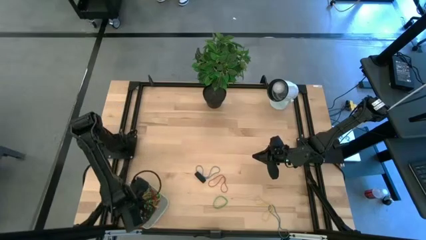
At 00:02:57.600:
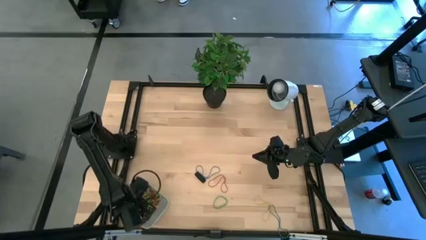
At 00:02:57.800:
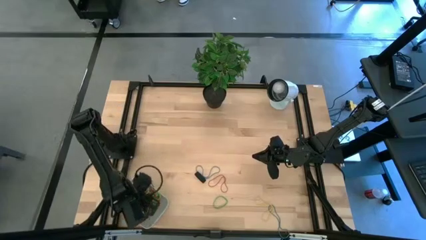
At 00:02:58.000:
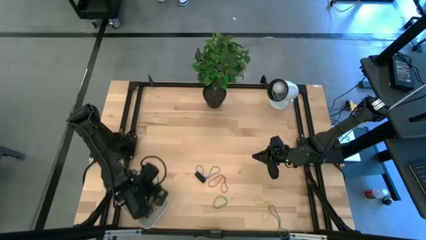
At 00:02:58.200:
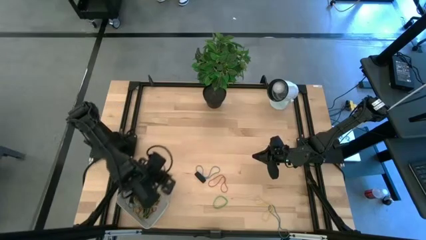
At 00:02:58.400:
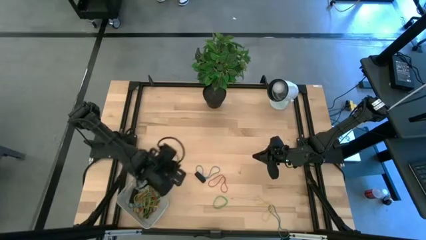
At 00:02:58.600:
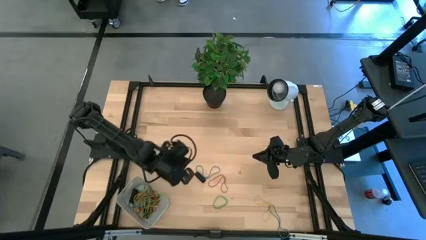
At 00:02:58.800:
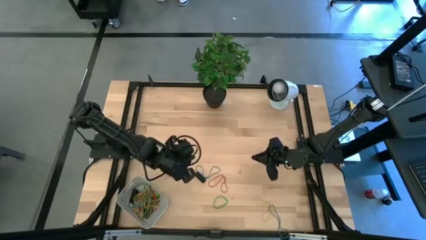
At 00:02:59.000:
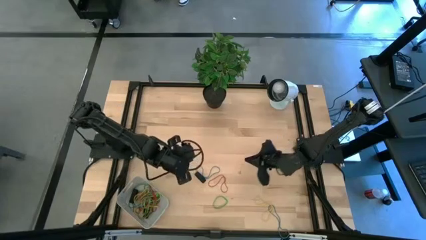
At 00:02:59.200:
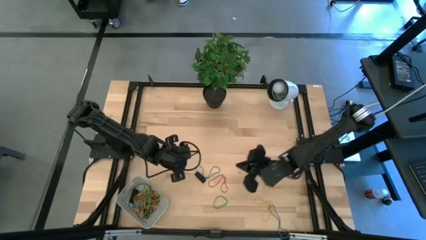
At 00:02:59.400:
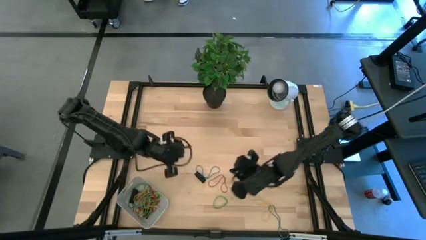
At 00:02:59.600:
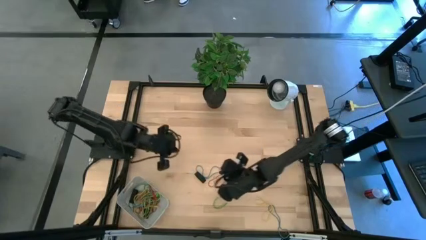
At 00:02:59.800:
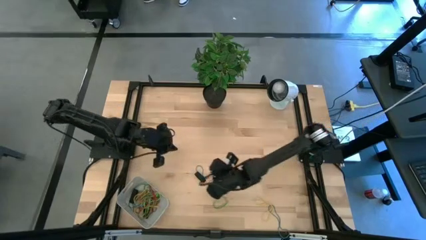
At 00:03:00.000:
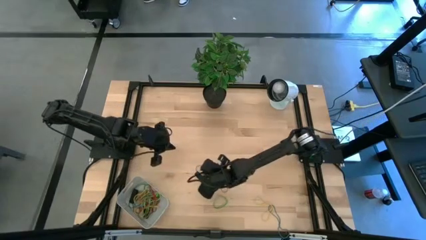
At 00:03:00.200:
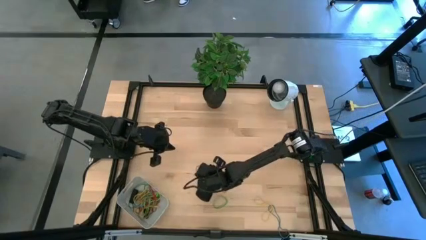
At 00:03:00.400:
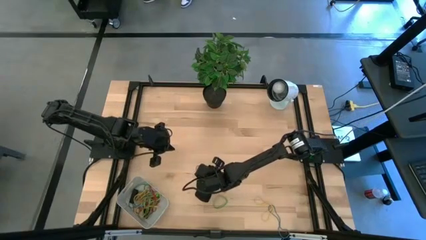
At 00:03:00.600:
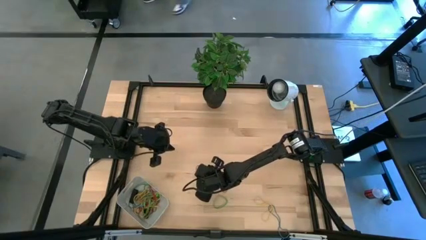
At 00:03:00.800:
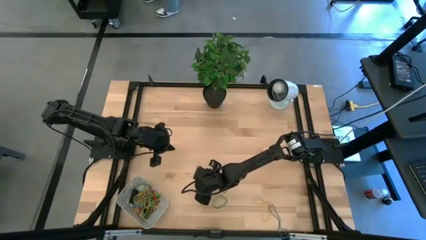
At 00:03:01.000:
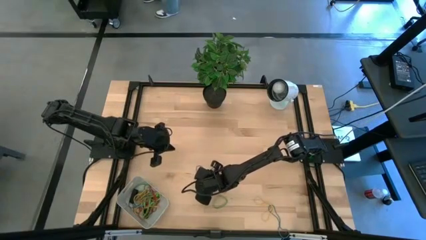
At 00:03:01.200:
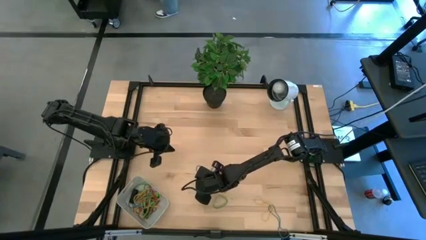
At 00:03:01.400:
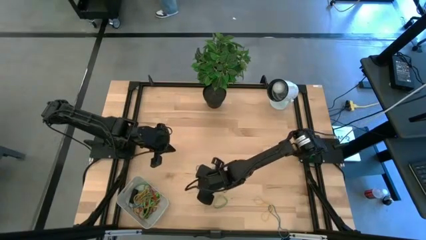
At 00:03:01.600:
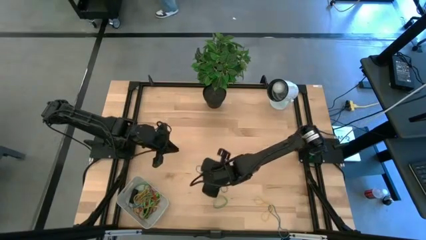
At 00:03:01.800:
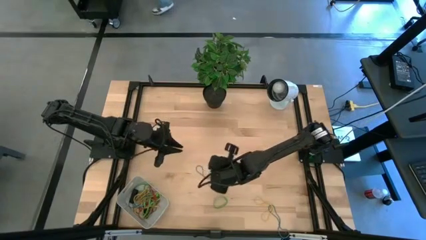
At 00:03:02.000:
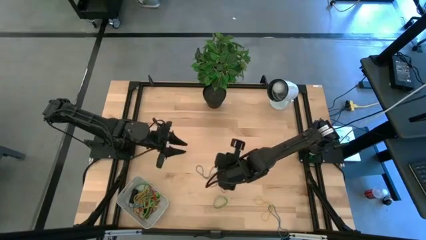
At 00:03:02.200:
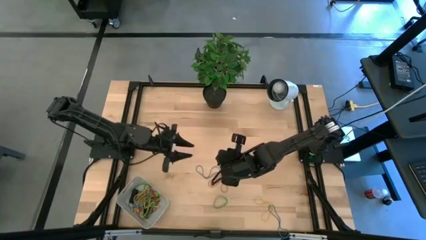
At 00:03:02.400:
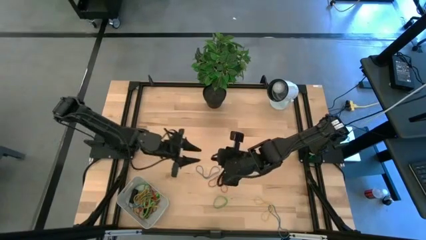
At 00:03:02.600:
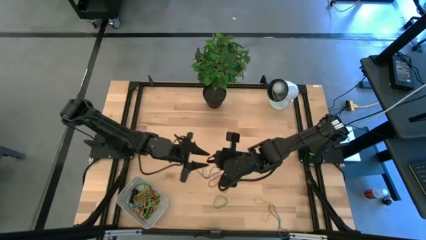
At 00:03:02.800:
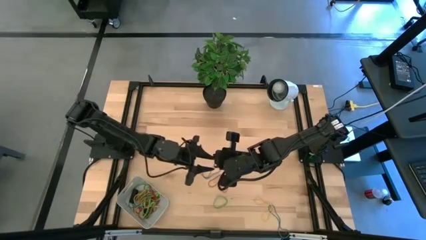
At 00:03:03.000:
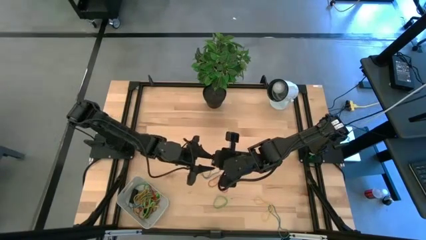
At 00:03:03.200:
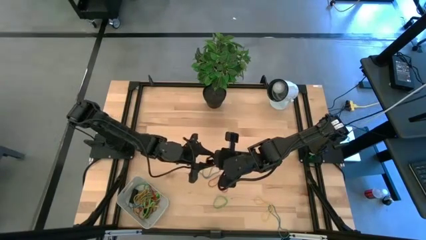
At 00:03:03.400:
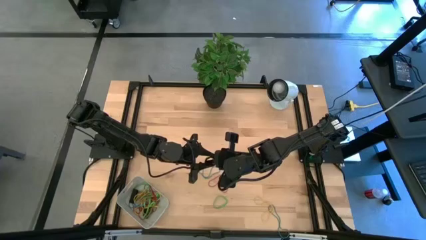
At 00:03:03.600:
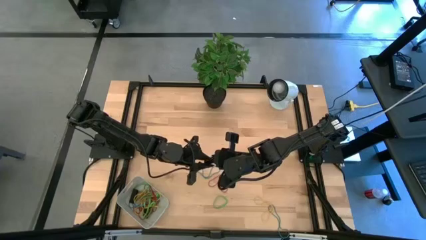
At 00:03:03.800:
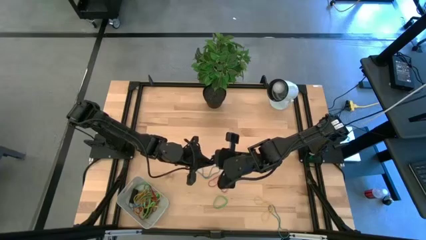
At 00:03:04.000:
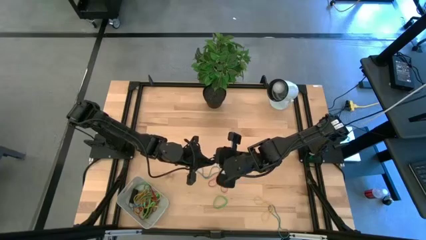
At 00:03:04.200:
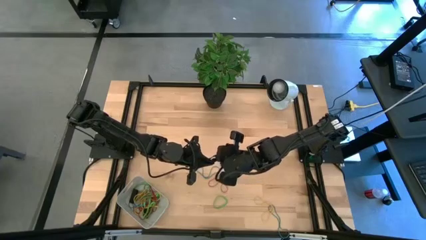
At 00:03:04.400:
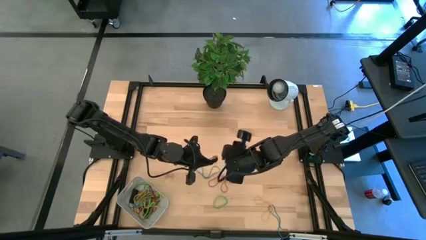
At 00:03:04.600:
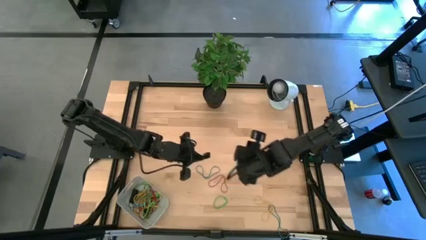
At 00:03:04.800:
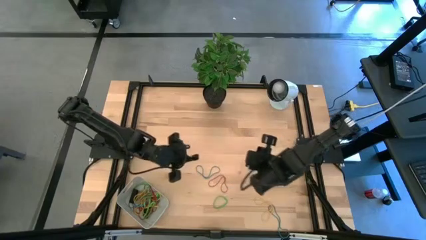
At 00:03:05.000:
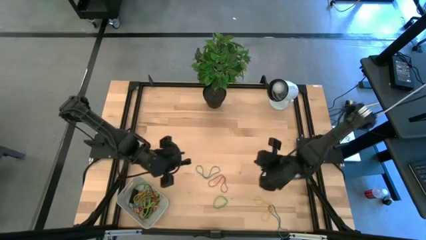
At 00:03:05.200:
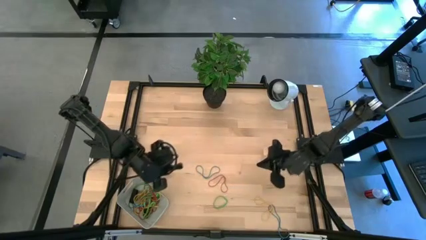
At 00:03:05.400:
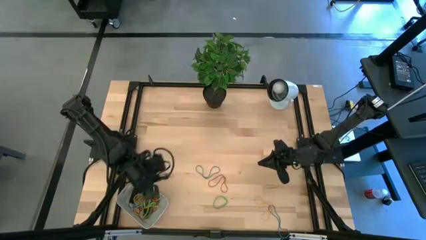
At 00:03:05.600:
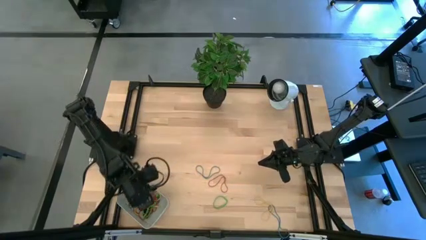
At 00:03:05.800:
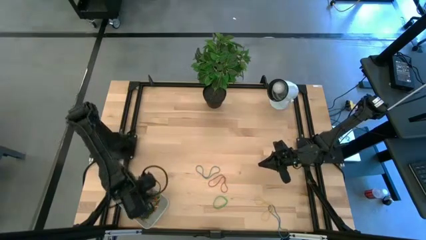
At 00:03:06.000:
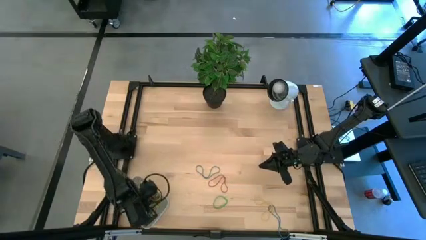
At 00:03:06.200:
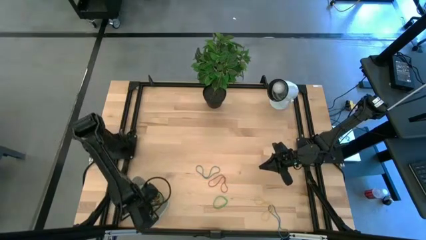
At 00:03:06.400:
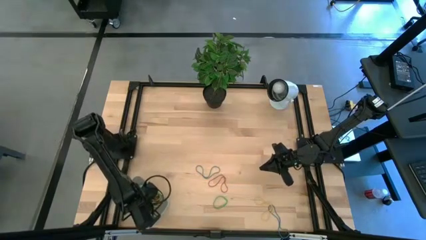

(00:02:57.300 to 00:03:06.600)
Task: Pick and place rubber bands into bin
Put the black rubber band into the gray bin

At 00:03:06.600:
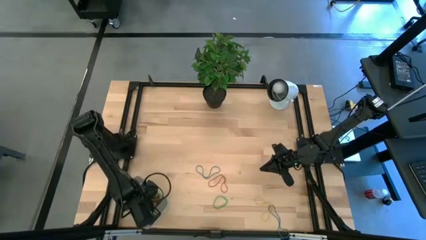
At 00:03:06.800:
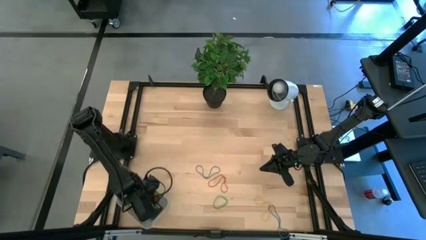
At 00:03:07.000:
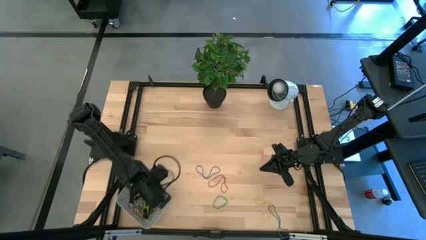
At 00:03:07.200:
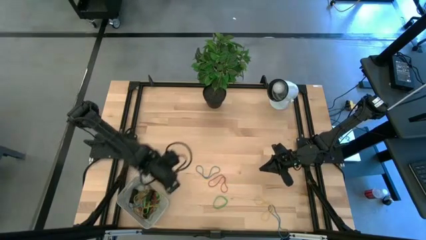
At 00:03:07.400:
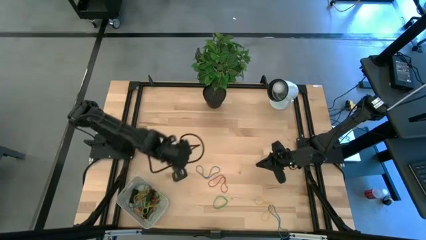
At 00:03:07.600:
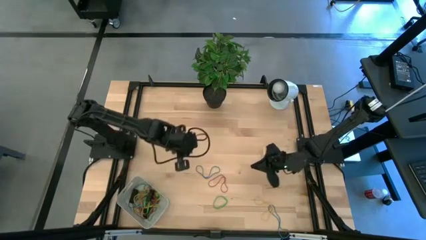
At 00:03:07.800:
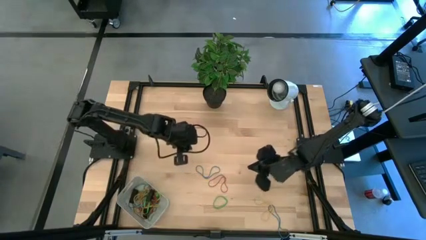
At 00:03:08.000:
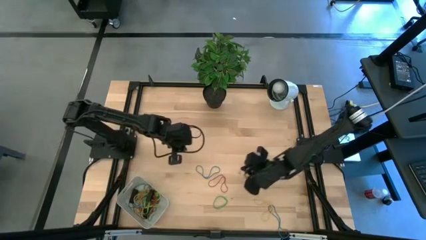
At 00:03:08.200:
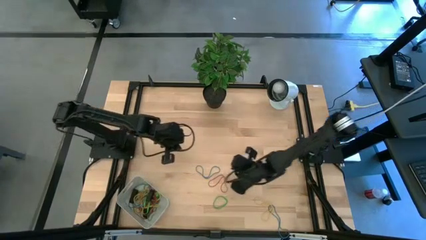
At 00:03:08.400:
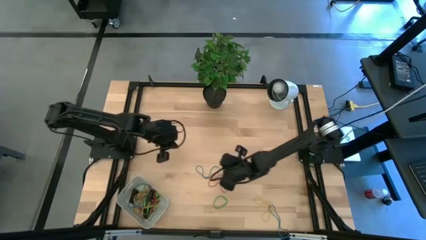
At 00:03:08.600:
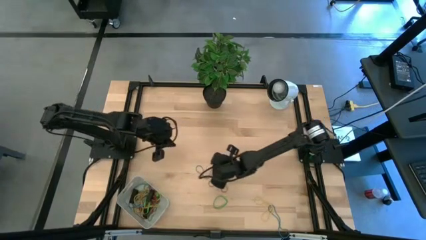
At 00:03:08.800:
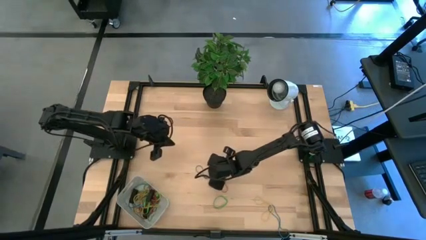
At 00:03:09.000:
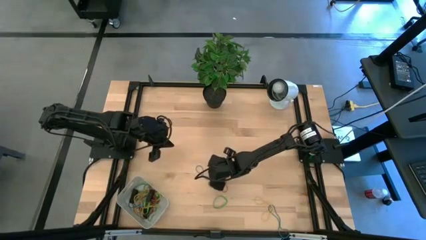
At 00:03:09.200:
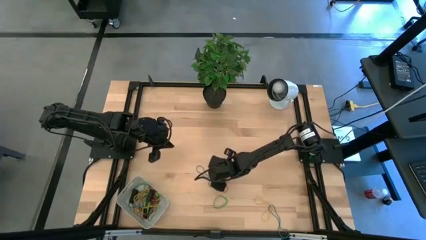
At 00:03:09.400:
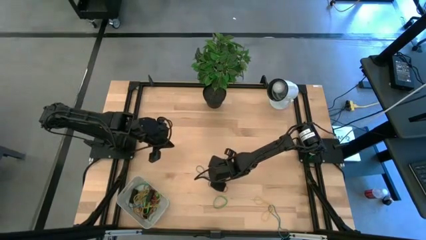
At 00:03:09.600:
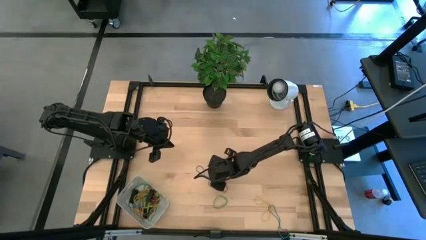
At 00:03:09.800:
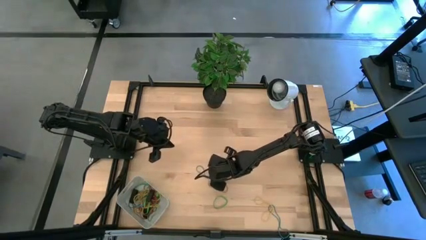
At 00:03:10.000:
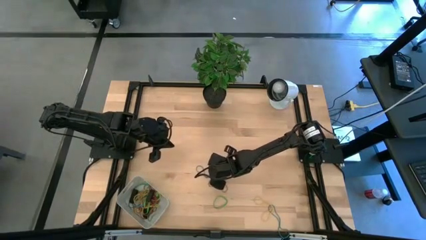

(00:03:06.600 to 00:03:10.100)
Put the top blue rubber band into the gray bin
